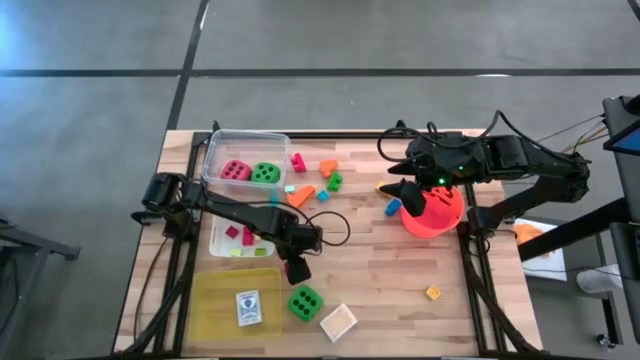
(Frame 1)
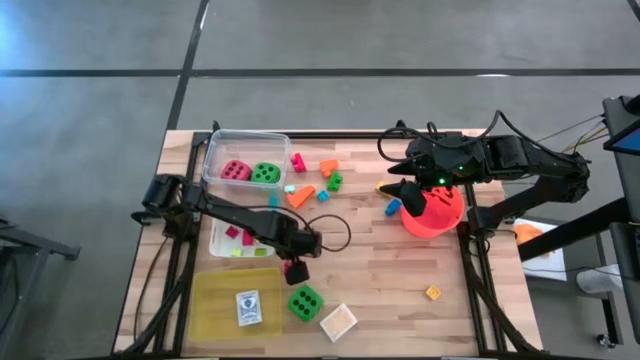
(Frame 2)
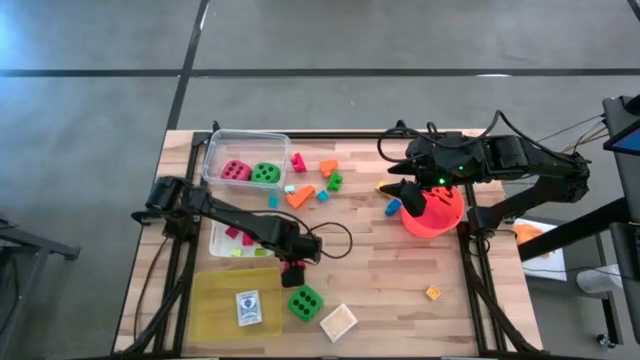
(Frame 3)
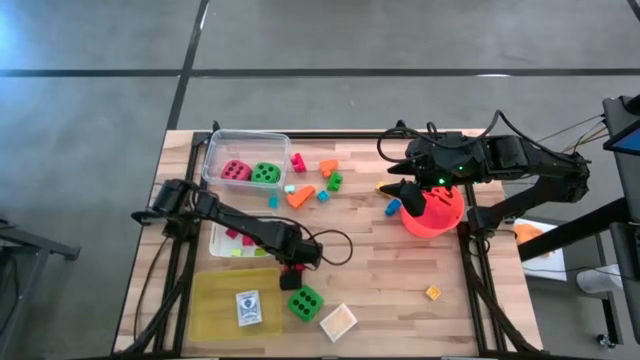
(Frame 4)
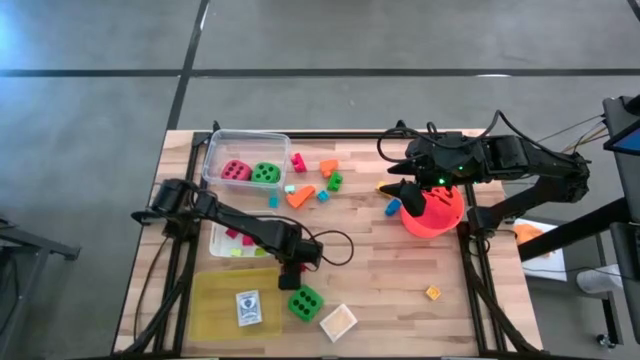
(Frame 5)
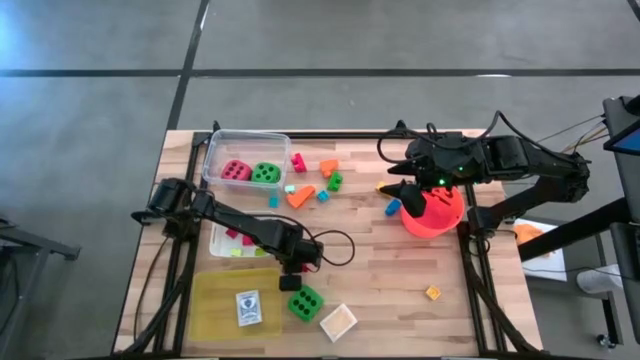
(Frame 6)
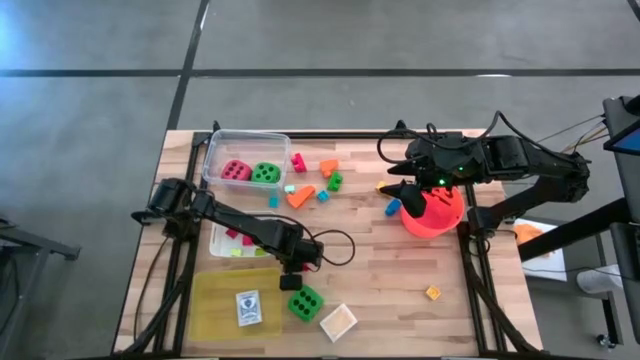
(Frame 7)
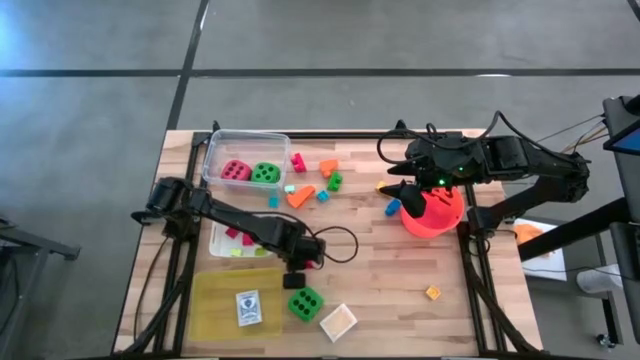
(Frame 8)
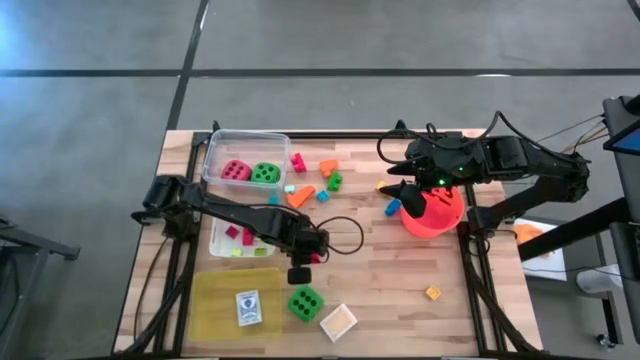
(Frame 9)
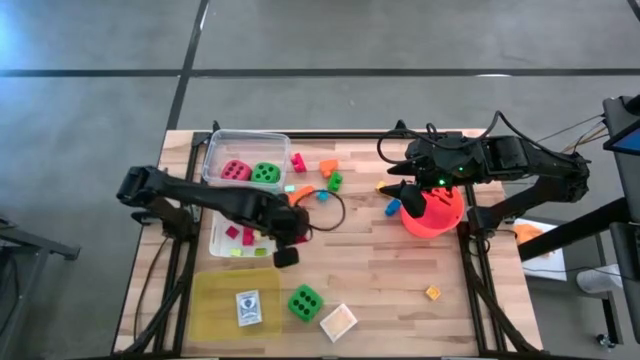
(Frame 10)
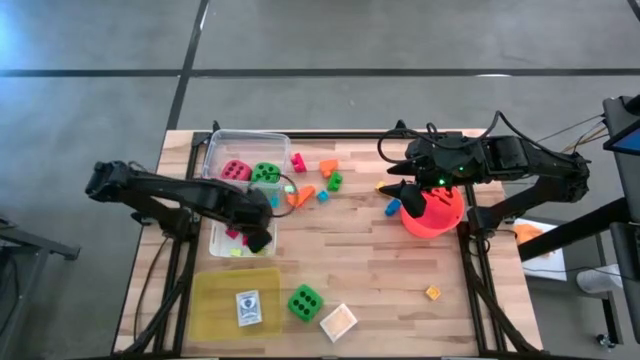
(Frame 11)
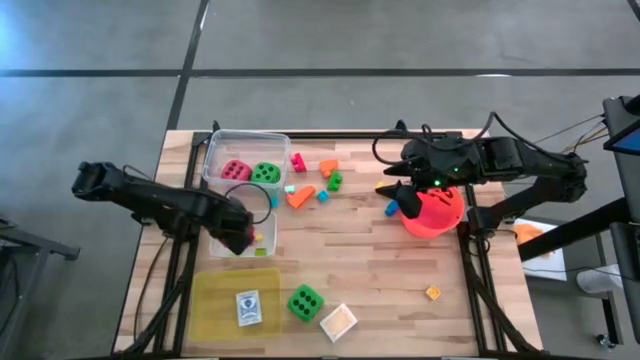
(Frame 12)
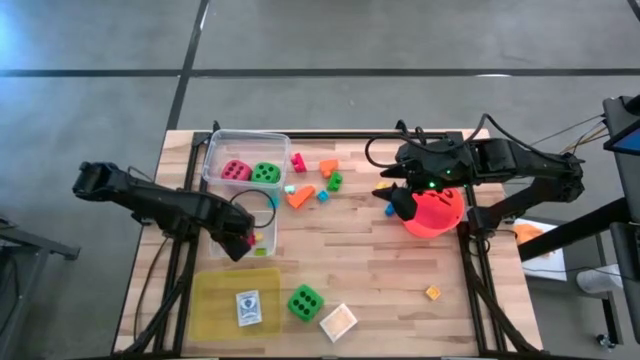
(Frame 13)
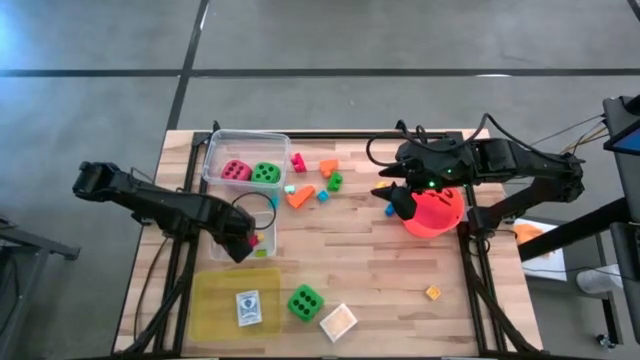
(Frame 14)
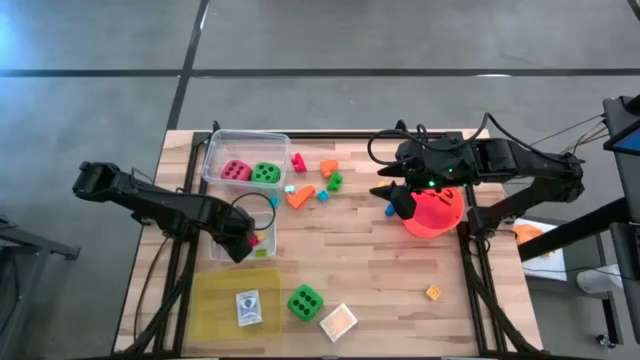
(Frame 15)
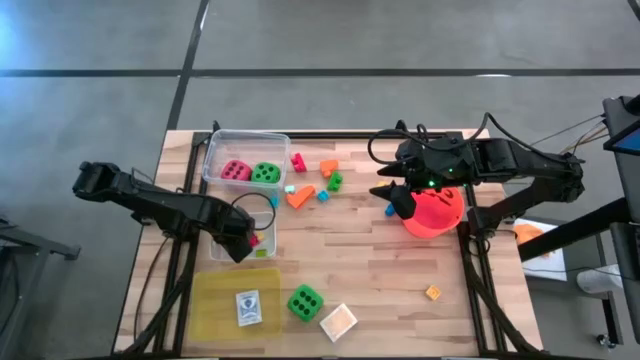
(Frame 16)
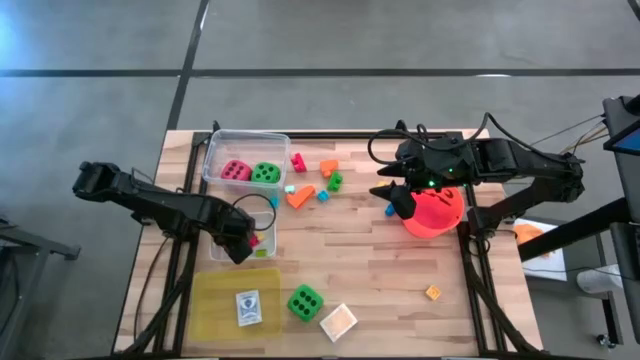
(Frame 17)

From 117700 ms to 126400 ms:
Task: Pick & Place Toys
Put the red game piece into the white bin

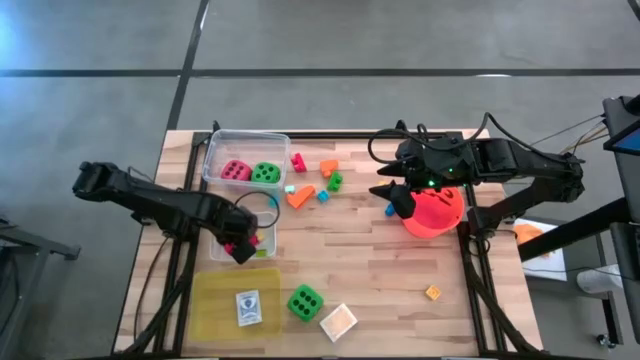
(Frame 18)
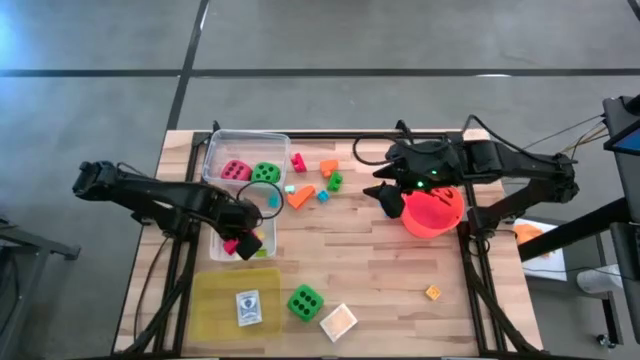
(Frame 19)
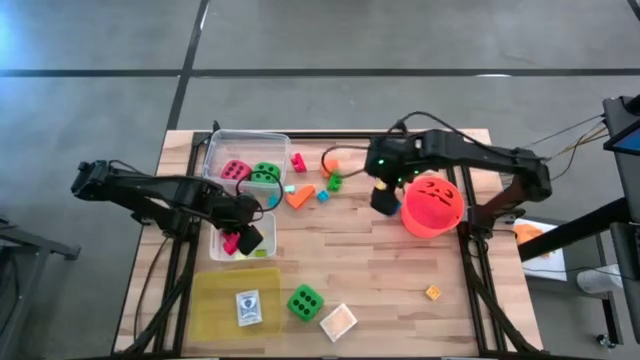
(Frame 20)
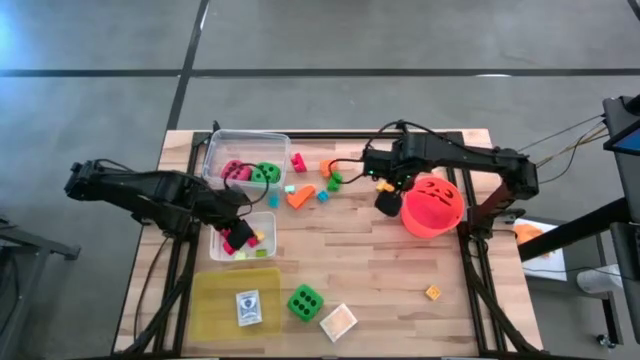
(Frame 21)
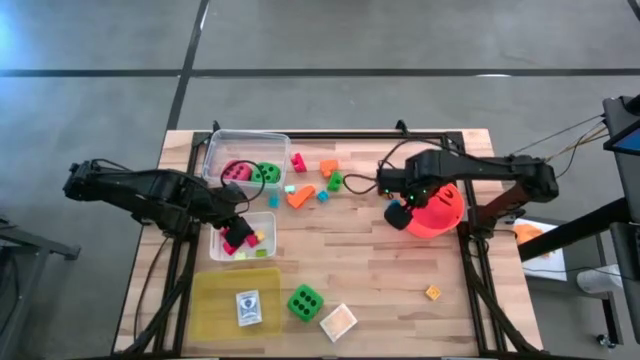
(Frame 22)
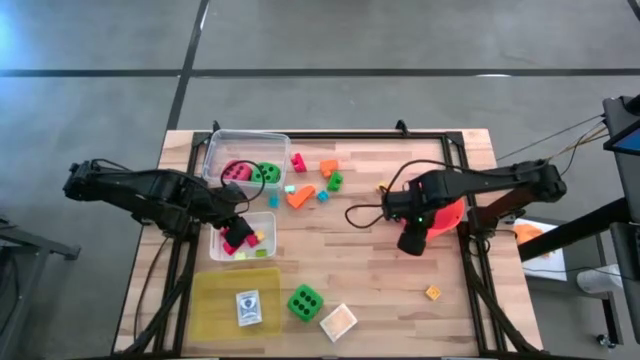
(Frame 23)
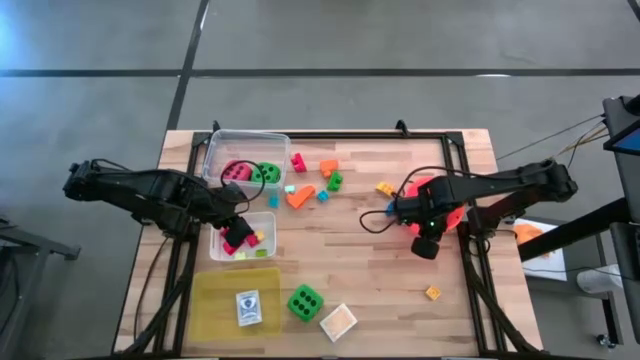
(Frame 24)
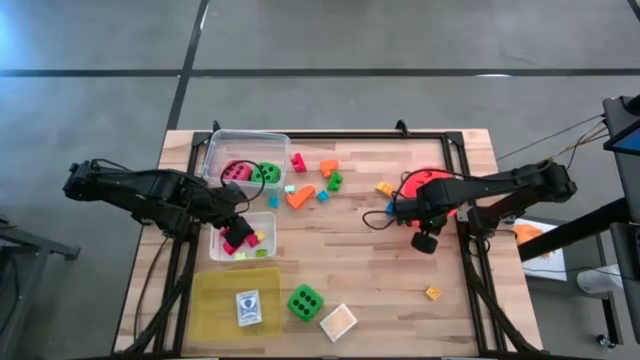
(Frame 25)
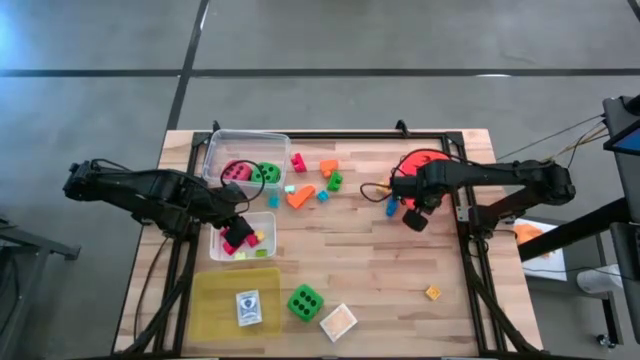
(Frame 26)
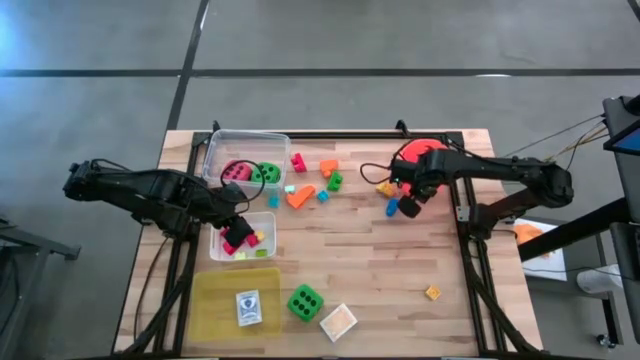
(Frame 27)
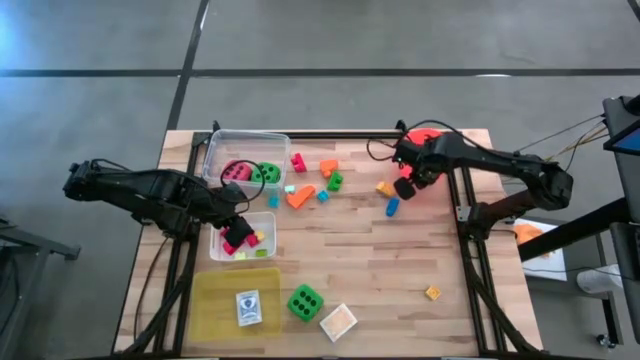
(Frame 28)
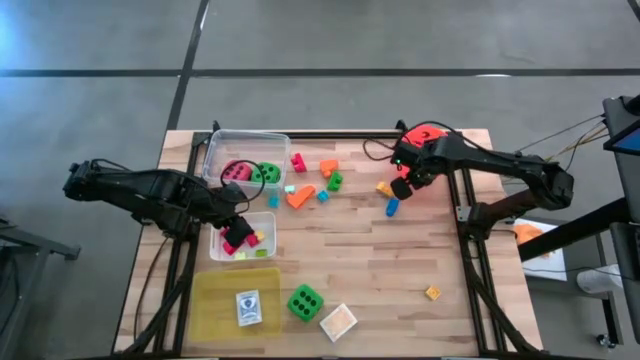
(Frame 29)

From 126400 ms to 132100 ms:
Move the orange bucket to the top right of the table

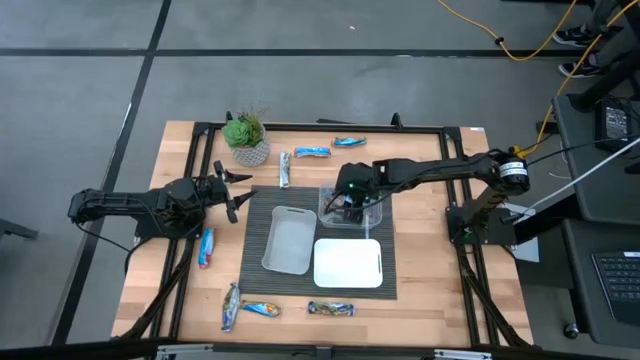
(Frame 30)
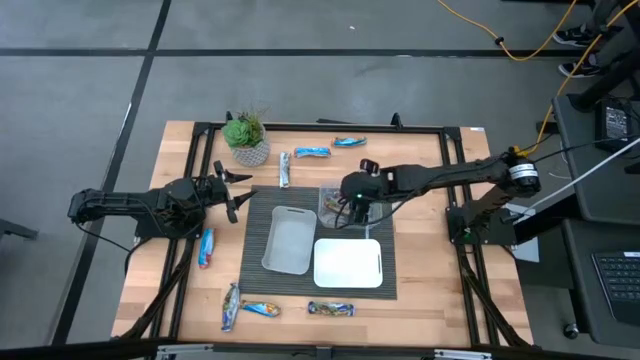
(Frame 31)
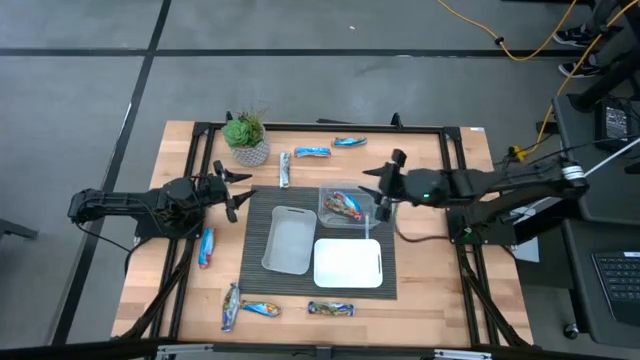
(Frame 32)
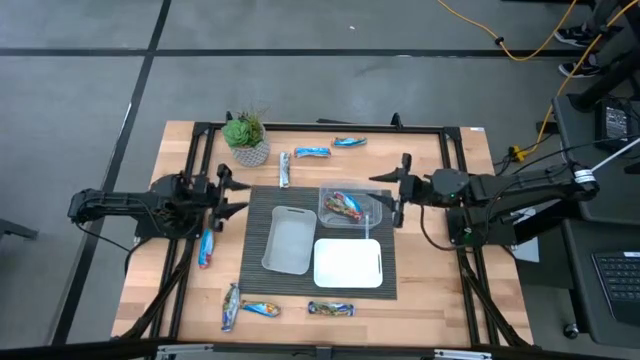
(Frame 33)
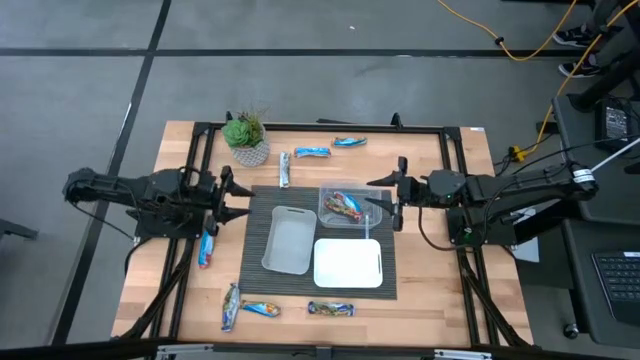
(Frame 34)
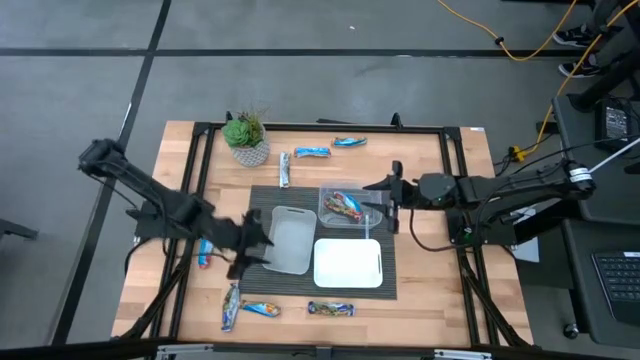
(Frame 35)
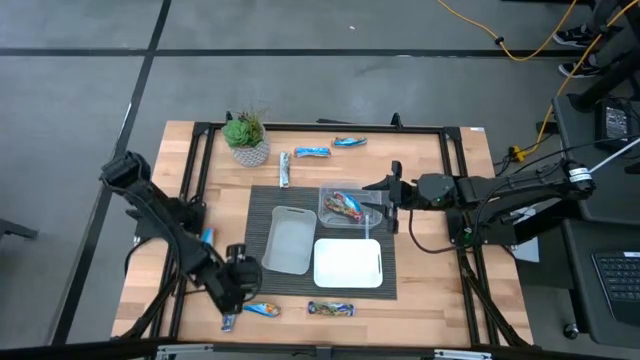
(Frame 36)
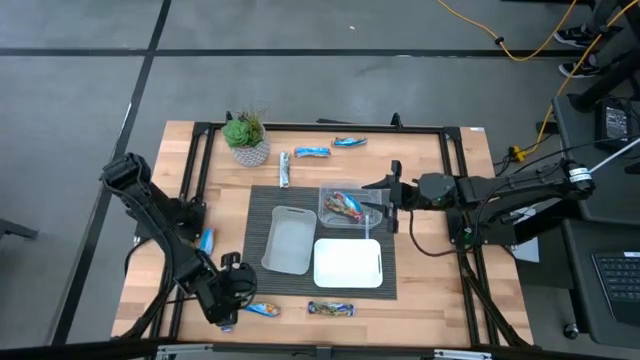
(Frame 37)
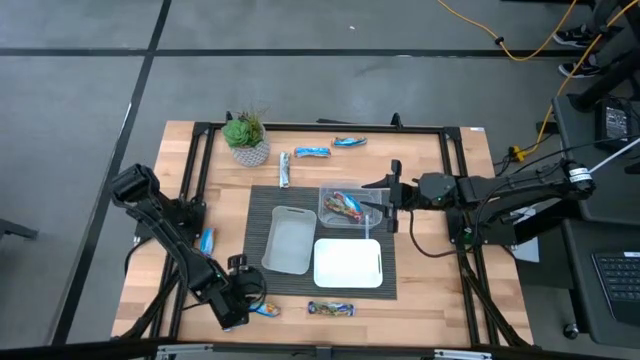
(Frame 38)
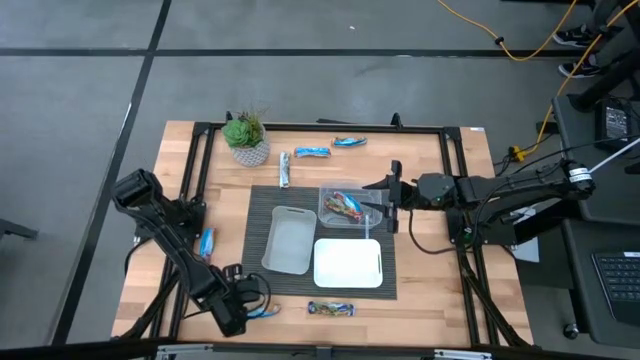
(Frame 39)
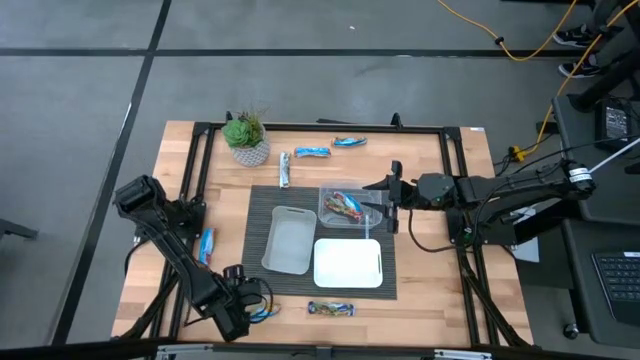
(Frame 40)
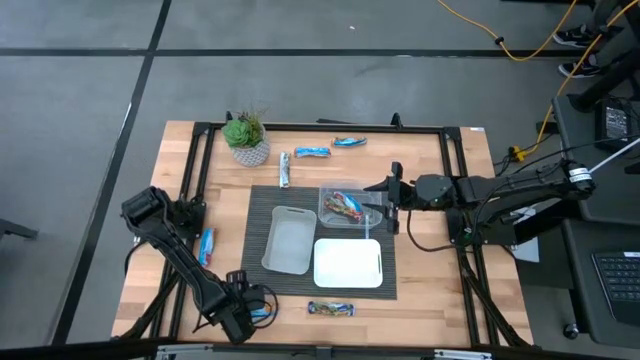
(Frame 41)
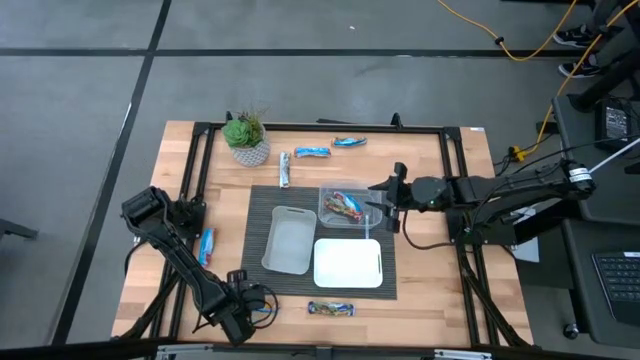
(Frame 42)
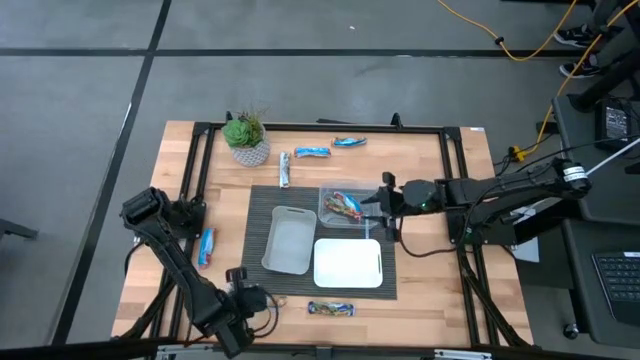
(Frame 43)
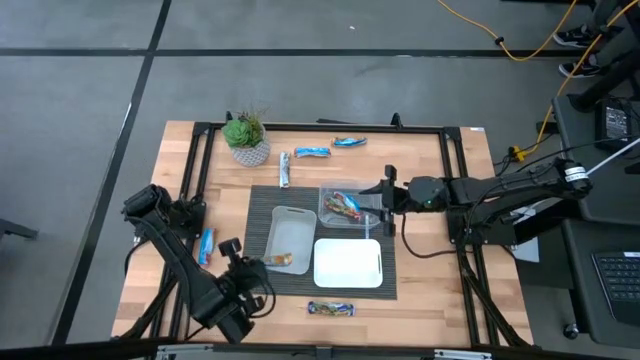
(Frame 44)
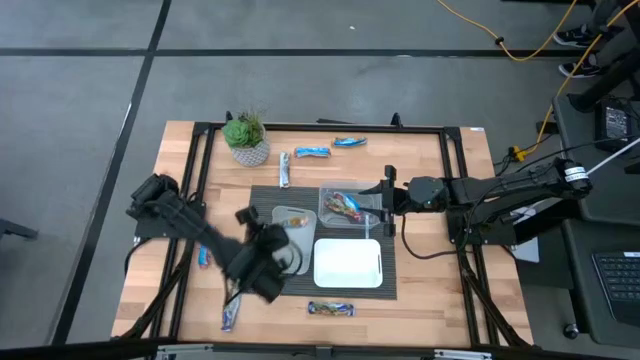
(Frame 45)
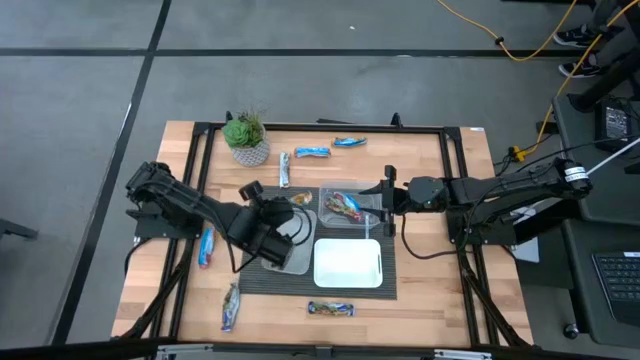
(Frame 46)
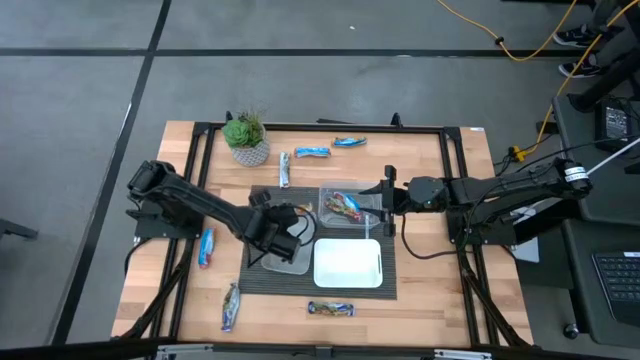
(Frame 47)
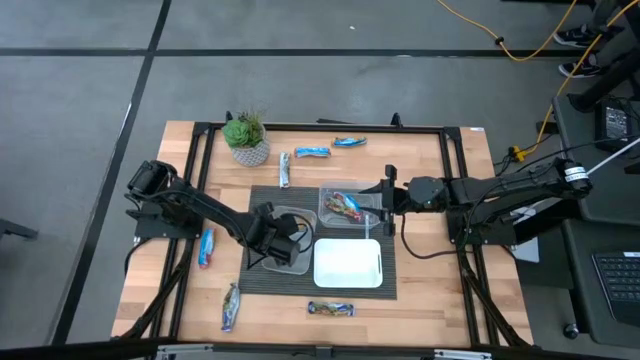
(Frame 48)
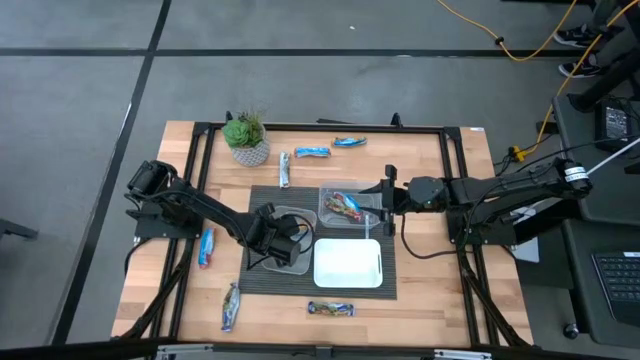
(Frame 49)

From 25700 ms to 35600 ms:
Task: Pick and place Granola Bars by type
Put the orange granola bar into the gray bin
